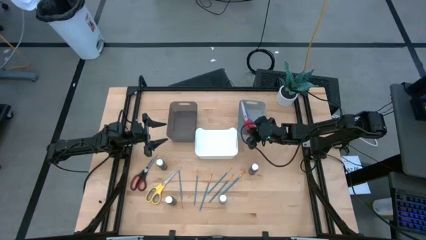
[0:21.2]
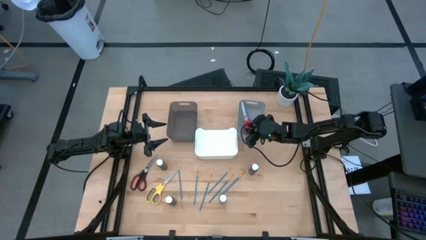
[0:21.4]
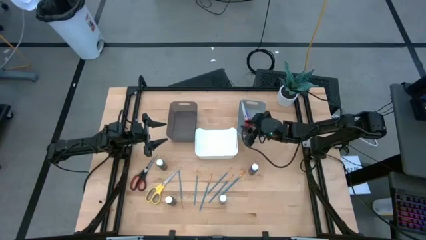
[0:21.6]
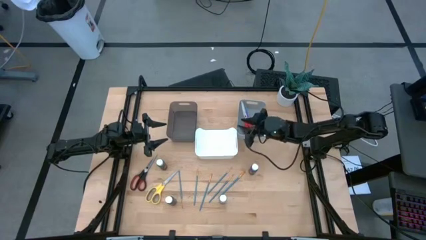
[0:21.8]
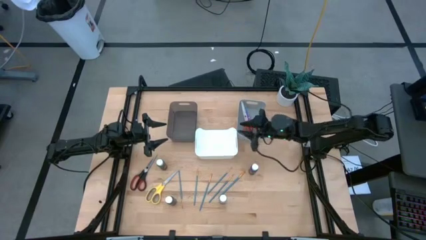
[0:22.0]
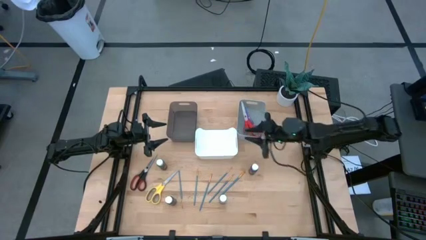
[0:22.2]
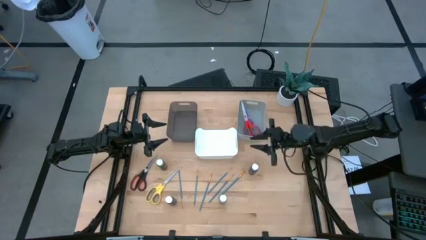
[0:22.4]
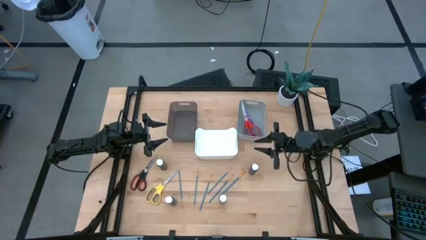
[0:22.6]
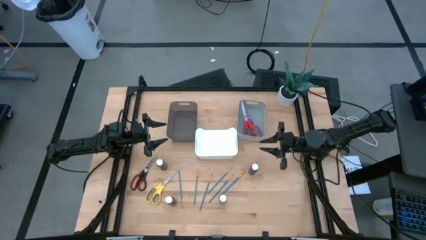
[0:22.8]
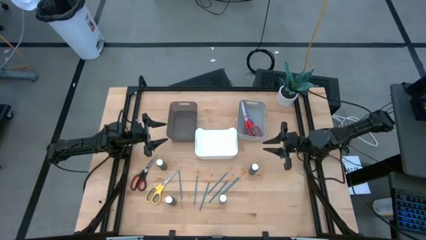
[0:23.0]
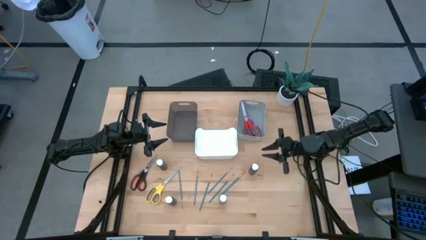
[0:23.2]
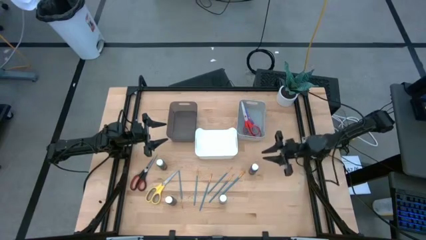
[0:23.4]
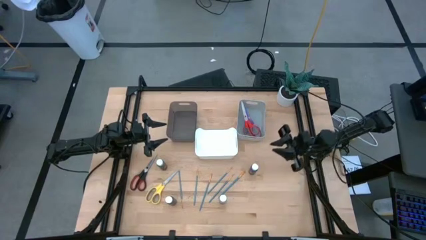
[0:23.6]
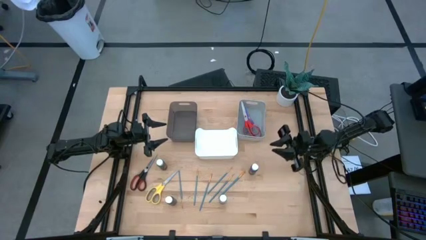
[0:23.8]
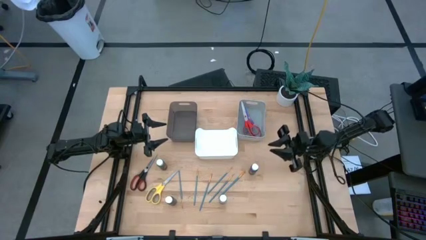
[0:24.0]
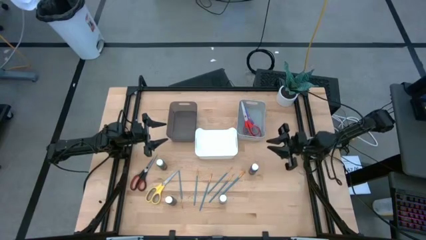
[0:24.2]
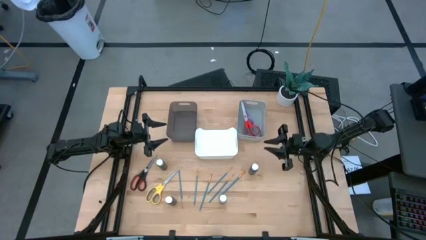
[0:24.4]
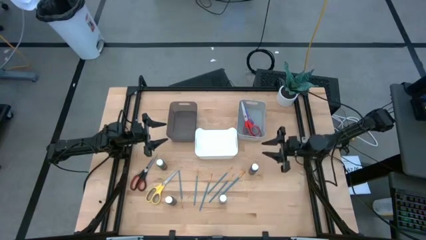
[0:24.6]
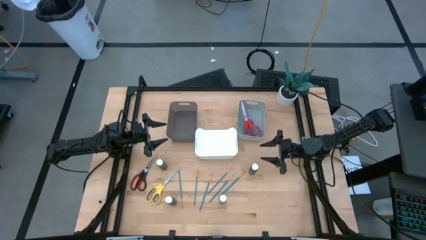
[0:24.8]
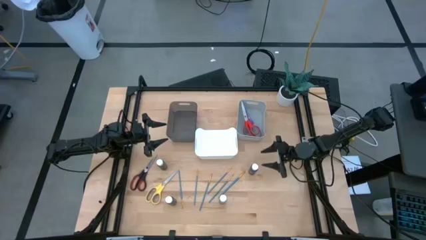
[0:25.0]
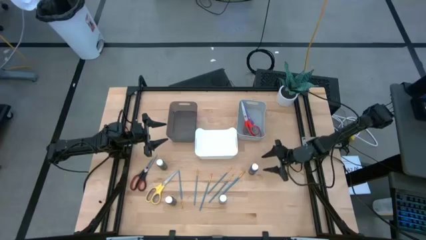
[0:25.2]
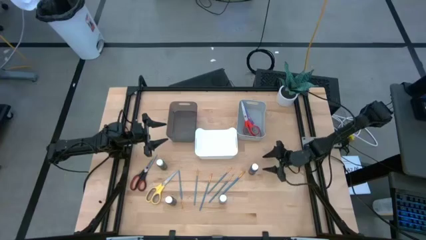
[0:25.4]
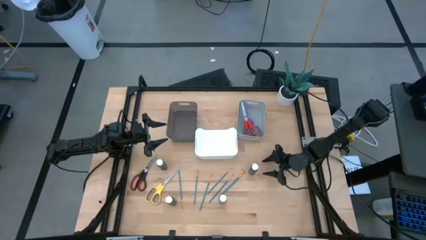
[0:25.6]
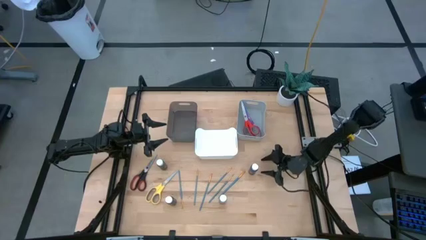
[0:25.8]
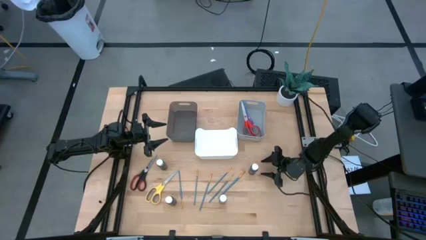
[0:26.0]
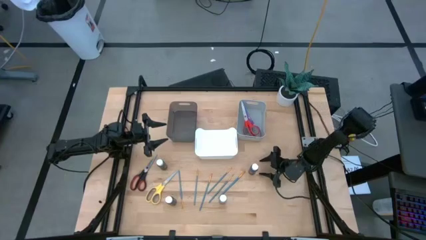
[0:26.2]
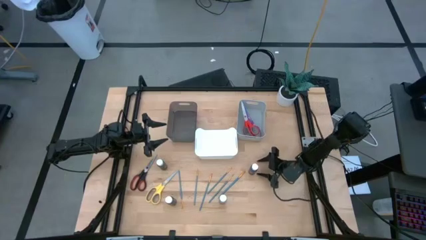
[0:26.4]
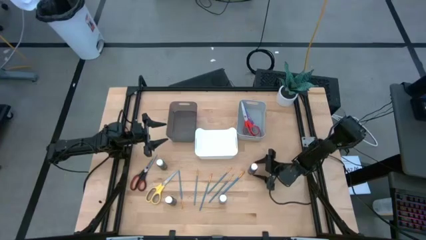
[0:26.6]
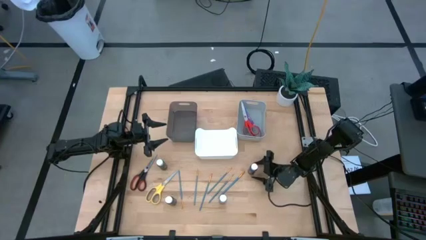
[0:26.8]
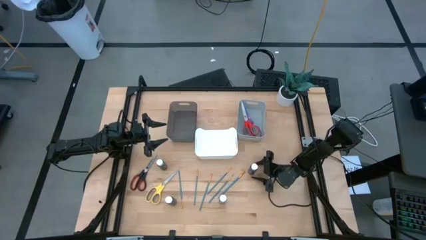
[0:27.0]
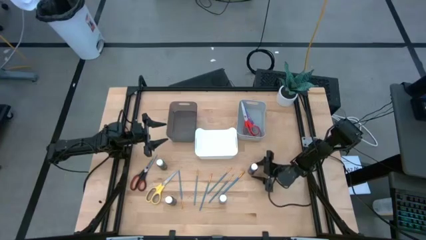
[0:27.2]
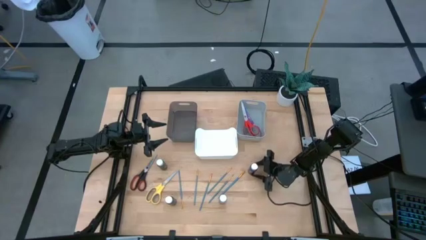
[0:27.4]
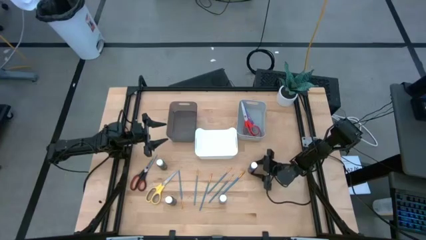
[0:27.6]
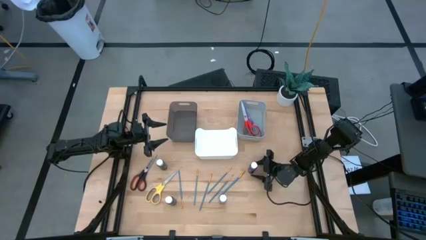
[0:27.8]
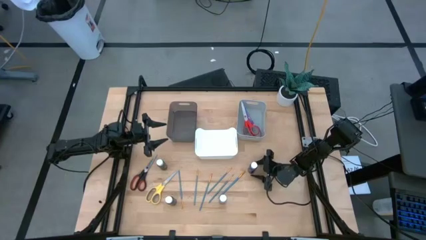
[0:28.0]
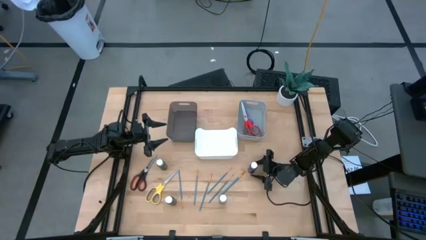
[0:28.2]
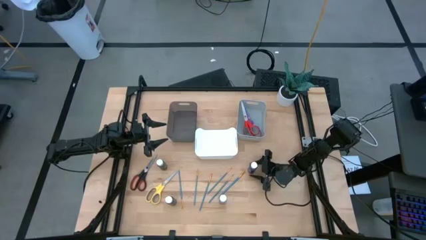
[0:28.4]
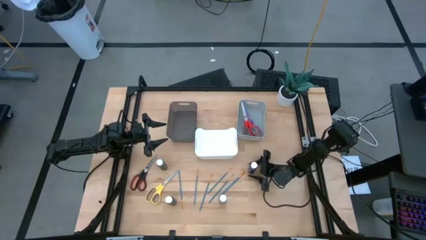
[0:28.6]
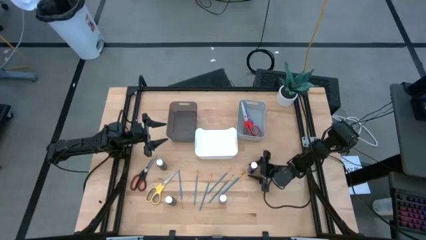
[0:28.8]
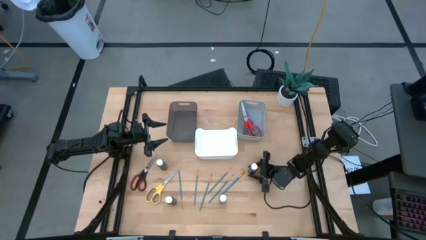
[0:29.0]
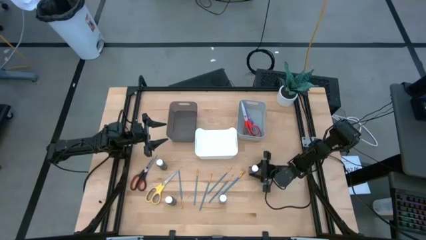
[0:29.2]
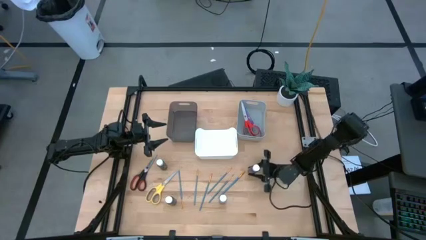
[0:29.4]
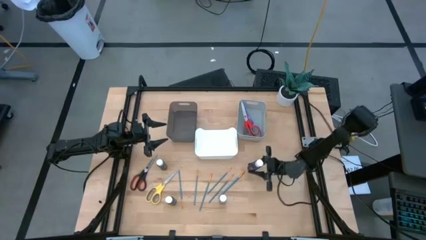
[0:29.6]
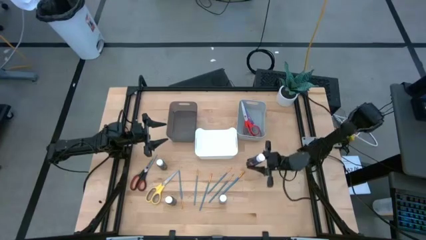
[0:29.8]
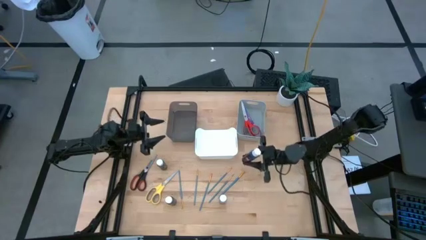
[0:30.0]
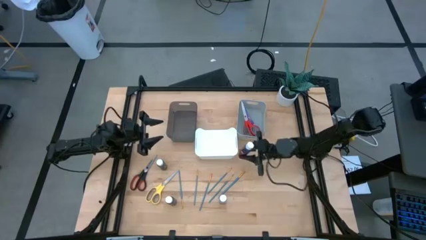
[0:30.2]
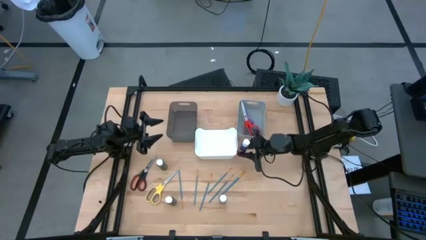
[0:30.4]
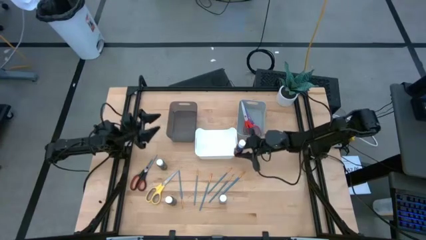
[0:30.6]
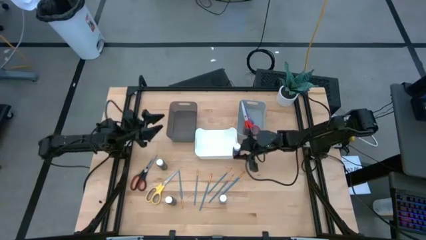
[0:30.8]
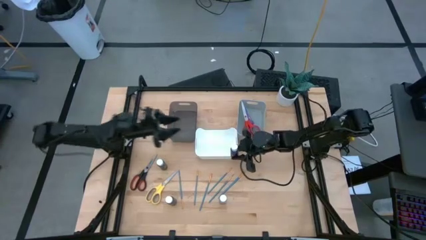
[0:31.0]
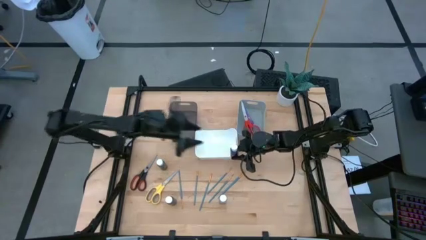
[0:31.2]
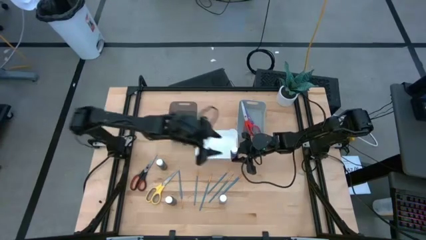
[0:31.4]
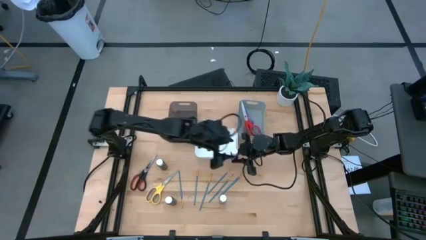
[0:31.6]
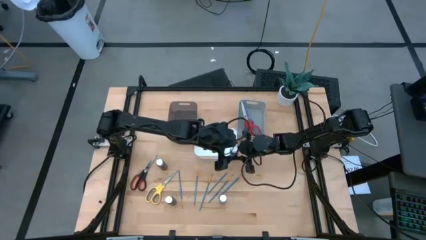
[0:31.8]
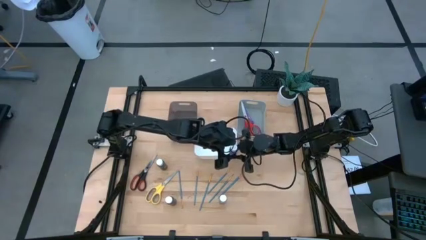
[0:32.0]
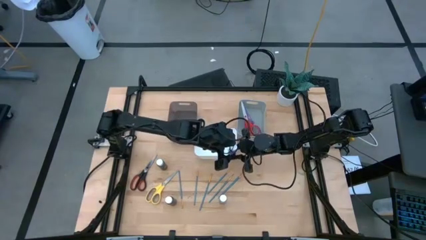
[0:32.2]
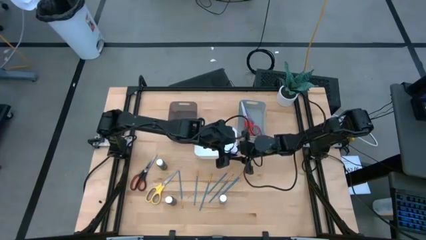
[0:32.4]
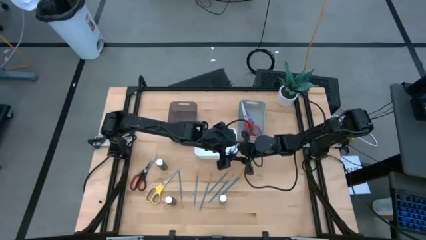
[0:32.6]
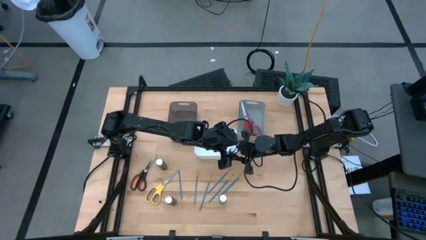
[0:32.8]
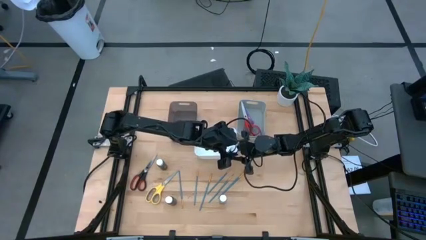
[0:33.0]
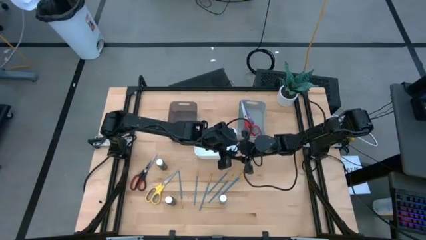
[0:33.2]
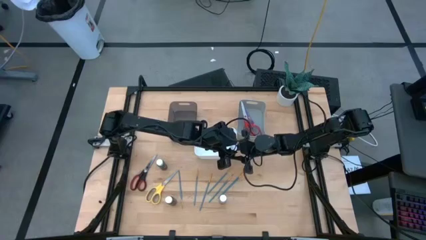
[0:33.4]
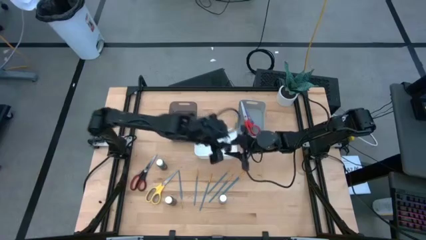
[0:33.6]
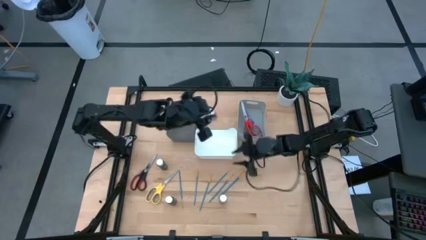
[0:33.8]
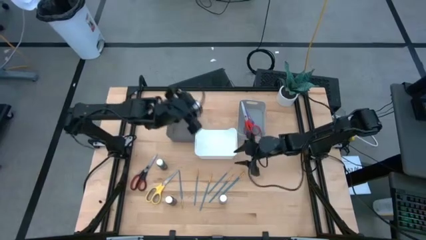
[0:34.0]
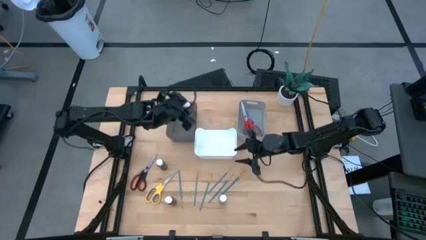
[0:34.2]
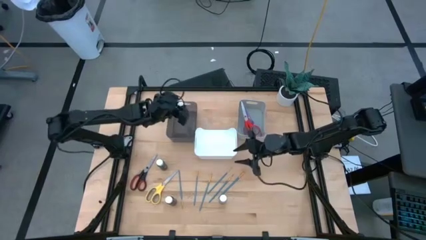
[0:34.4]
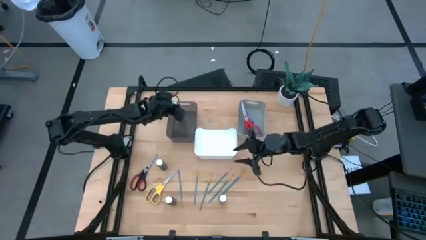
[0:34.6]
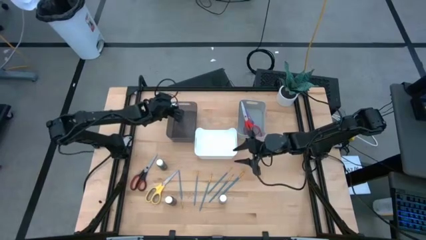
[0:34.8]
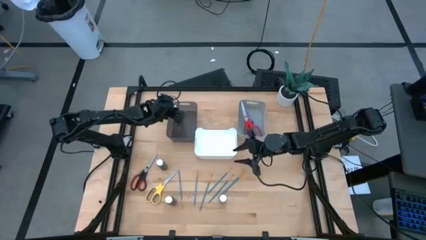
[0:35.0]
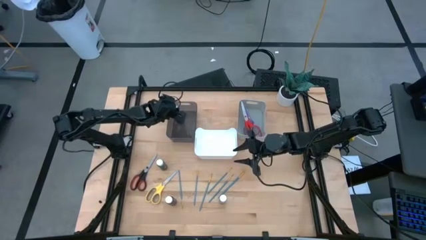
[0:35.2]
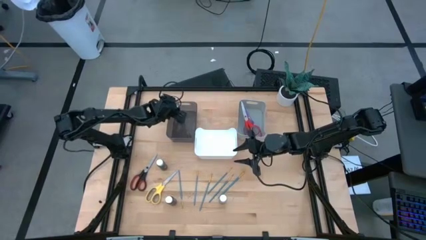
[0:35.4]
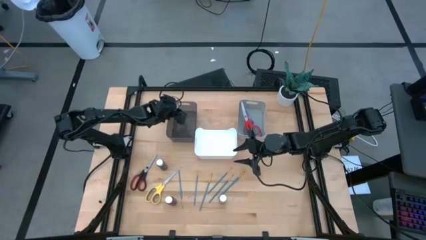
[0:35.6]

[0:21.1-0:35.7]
Task: Pick & Place Paint Supplies
Put the purple paint bottle into the black bin
